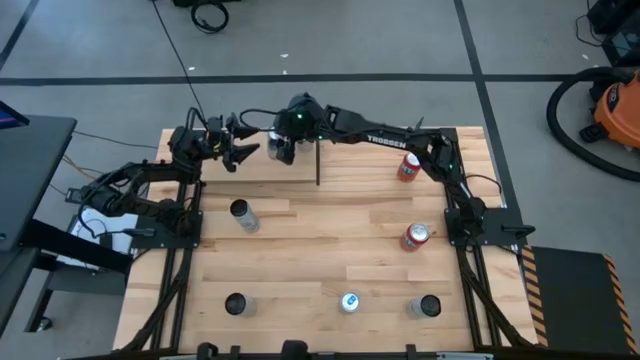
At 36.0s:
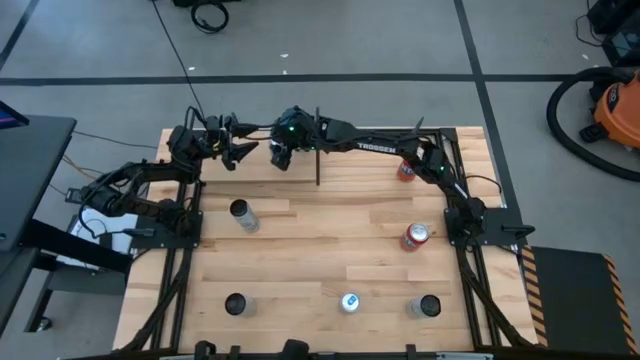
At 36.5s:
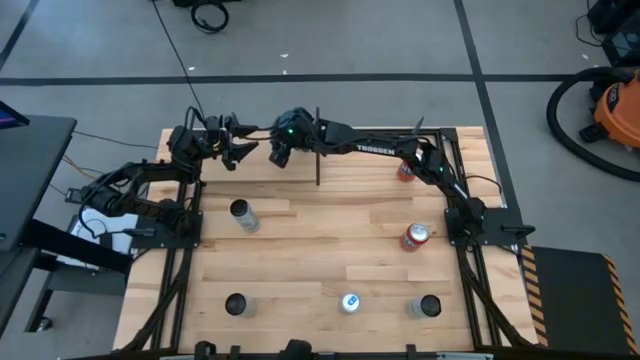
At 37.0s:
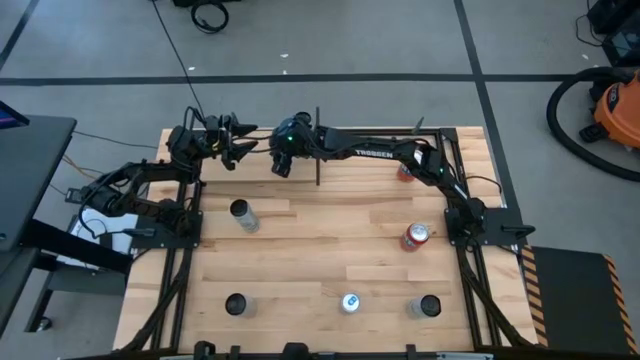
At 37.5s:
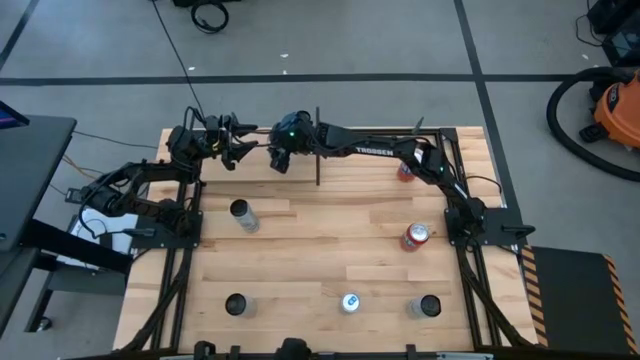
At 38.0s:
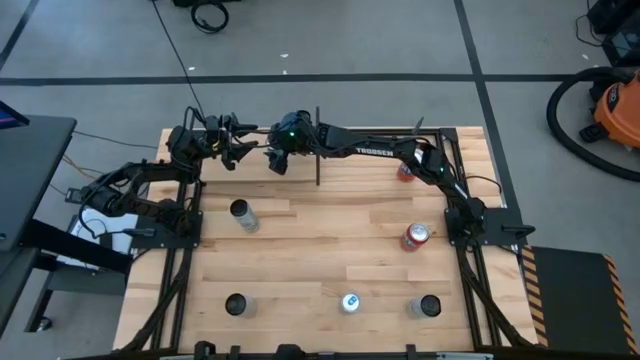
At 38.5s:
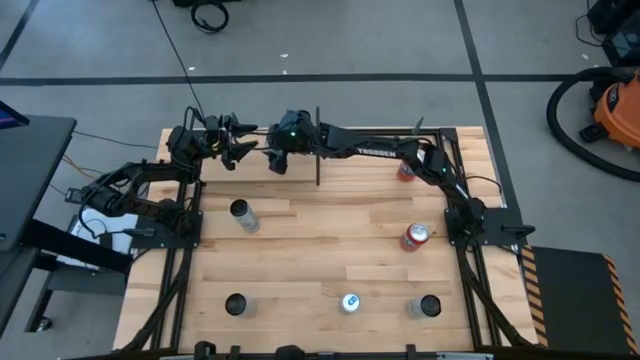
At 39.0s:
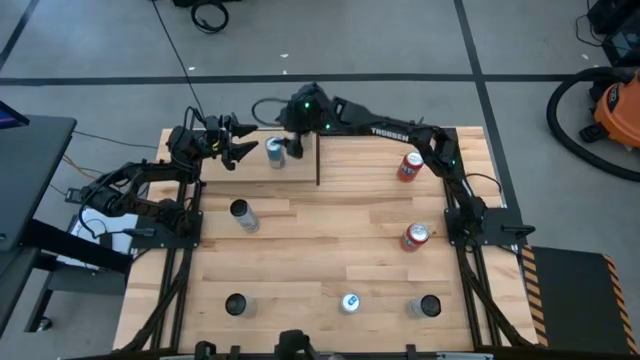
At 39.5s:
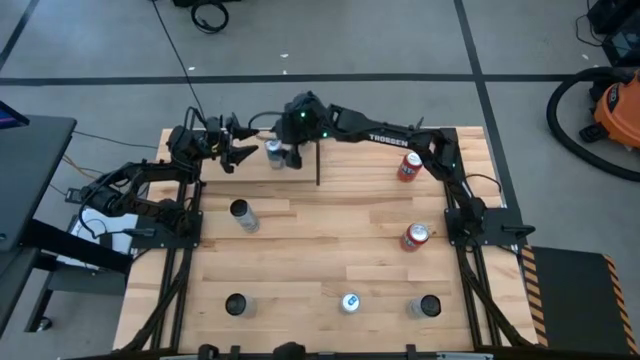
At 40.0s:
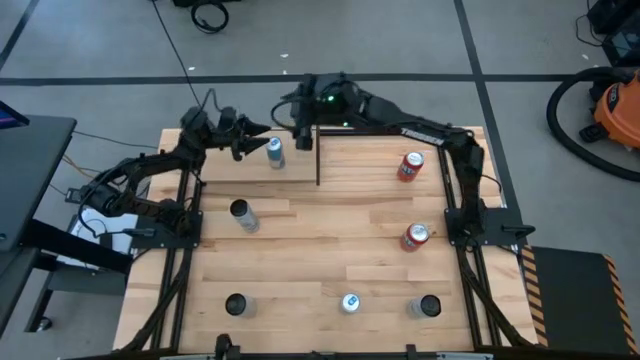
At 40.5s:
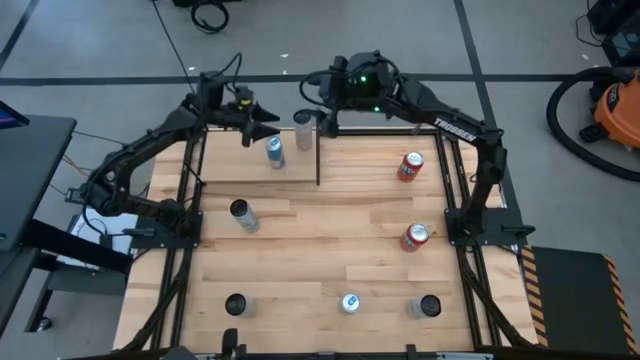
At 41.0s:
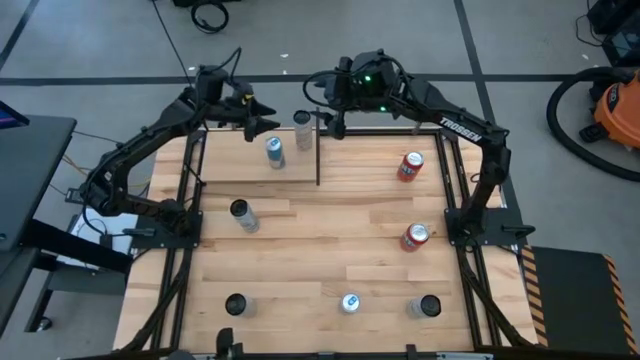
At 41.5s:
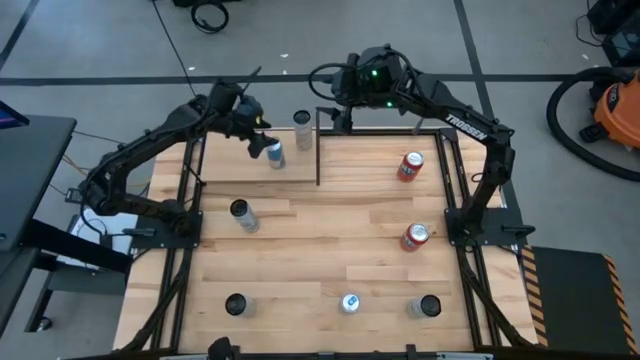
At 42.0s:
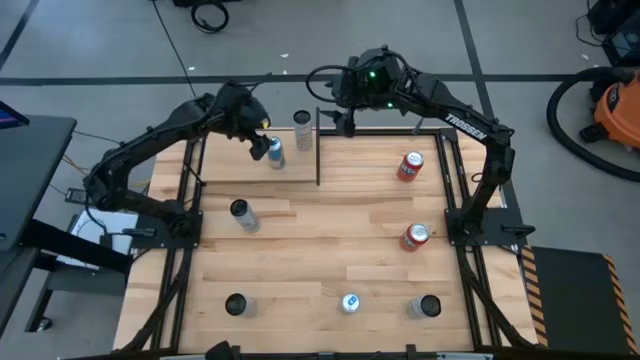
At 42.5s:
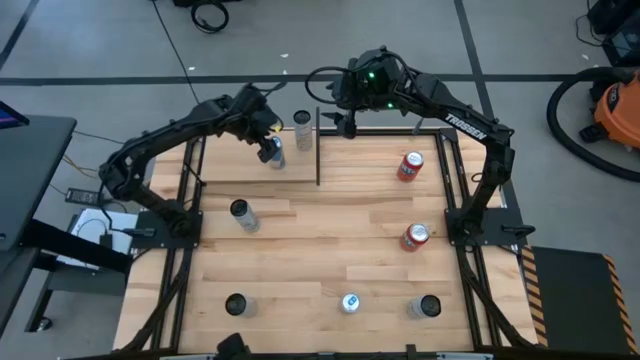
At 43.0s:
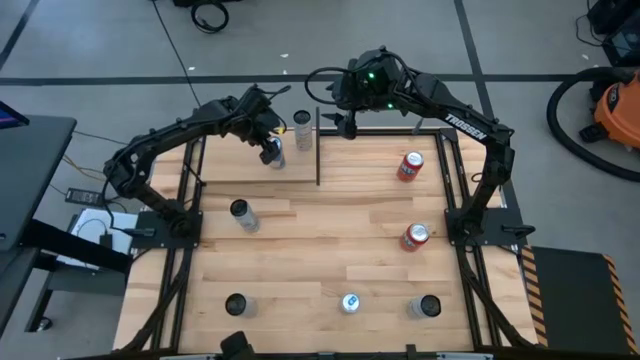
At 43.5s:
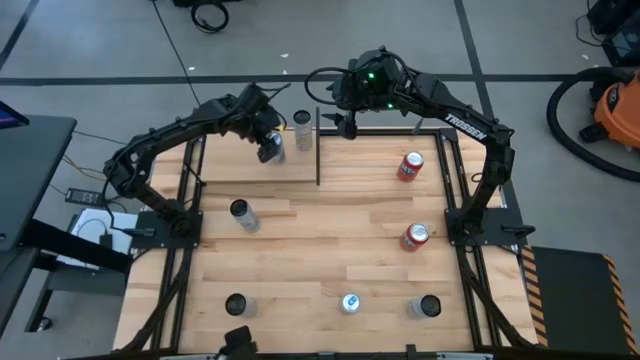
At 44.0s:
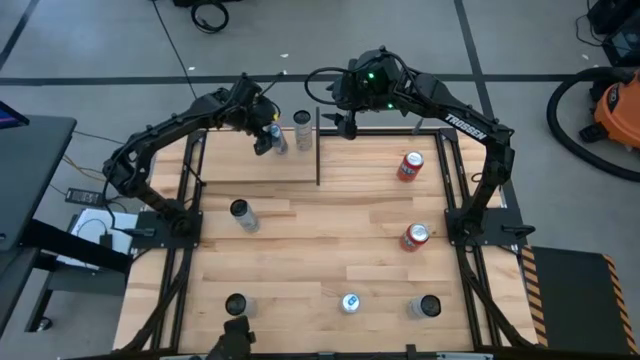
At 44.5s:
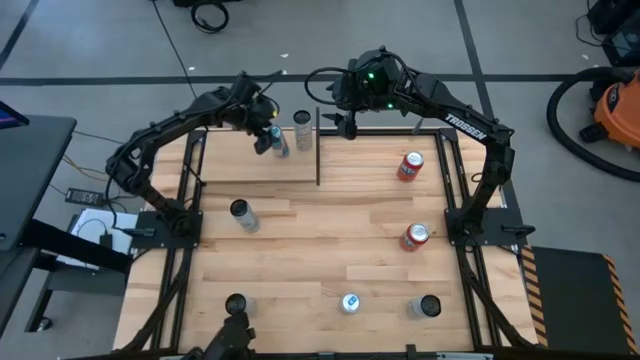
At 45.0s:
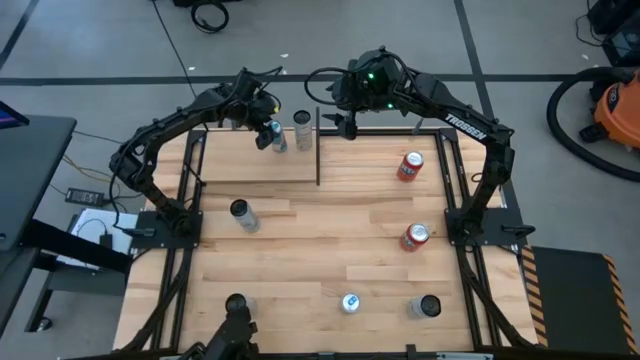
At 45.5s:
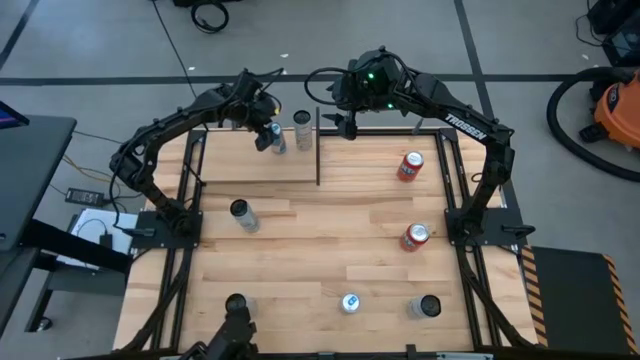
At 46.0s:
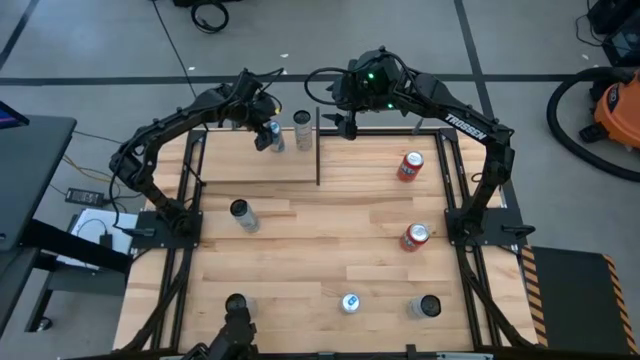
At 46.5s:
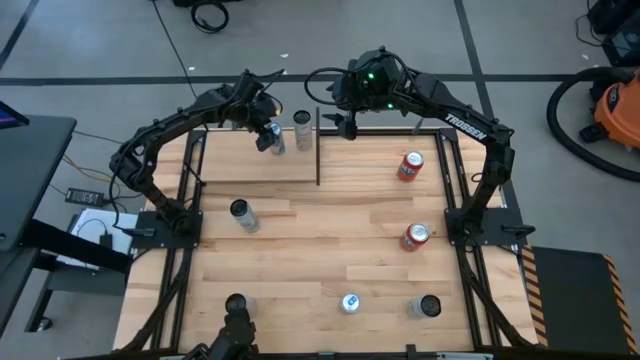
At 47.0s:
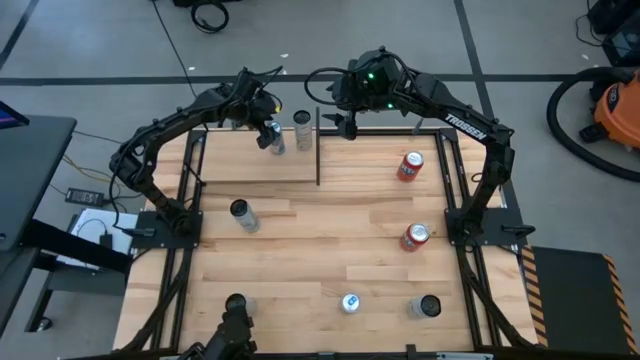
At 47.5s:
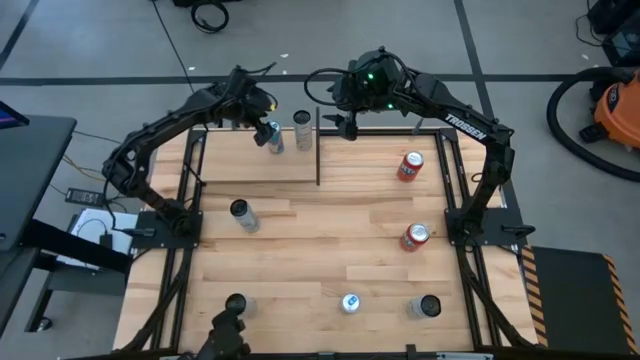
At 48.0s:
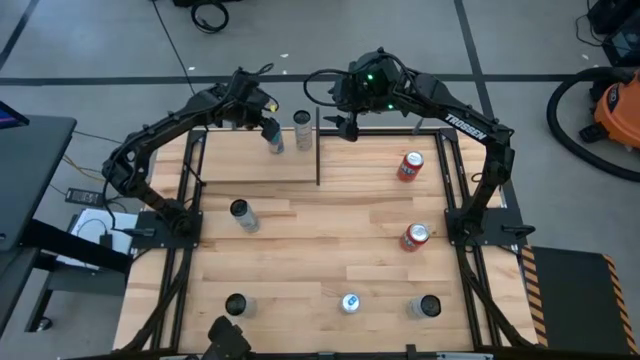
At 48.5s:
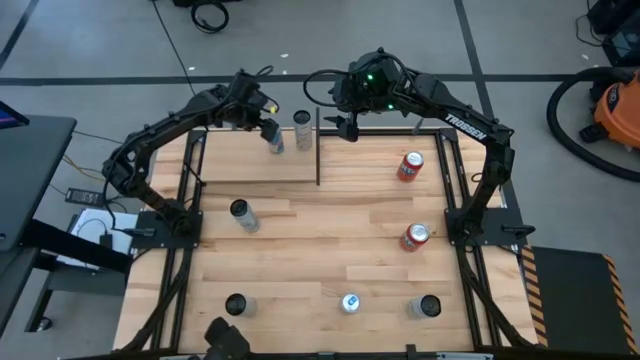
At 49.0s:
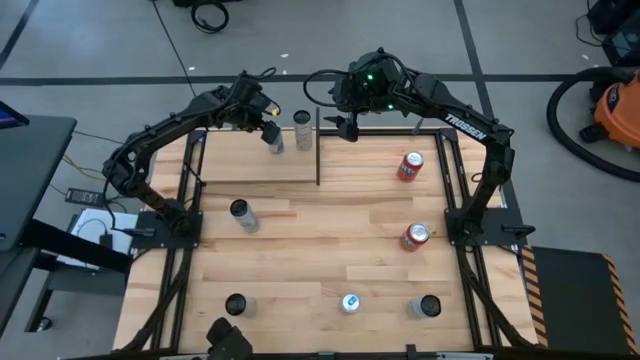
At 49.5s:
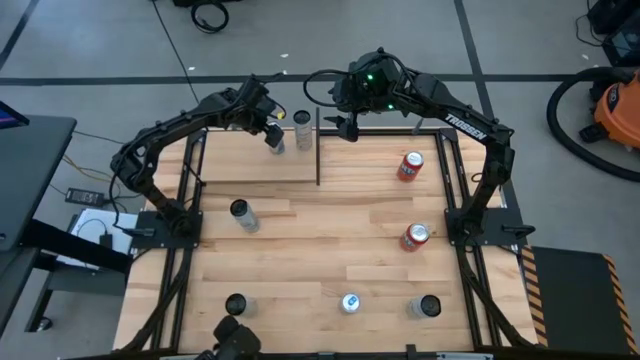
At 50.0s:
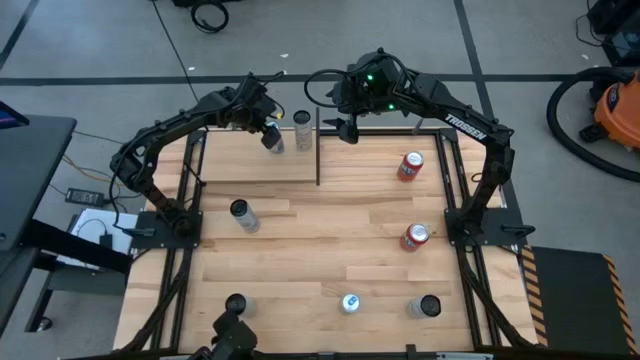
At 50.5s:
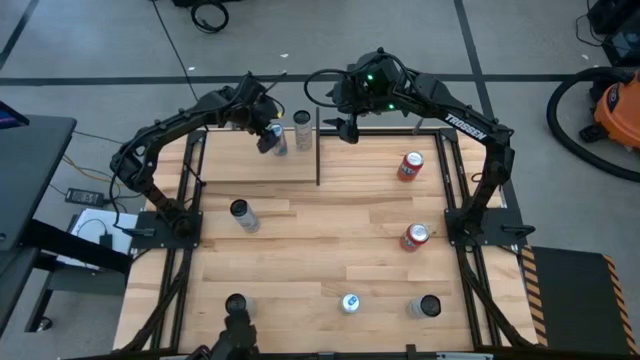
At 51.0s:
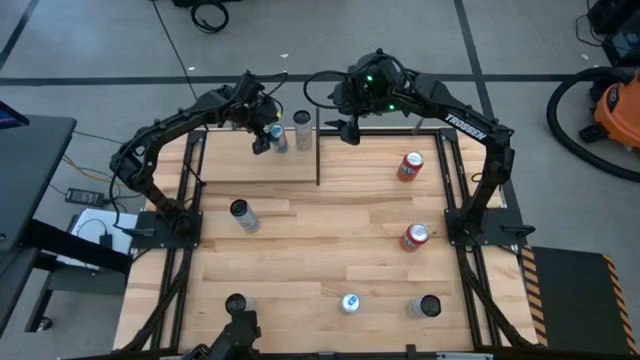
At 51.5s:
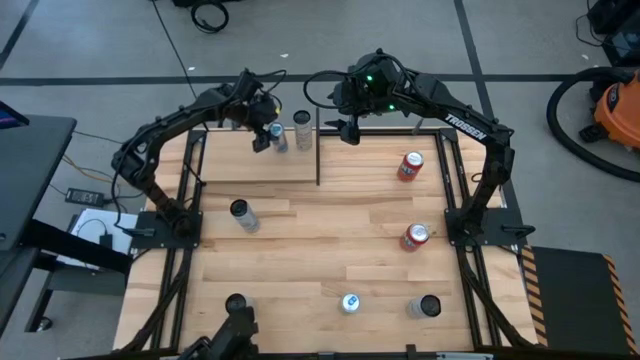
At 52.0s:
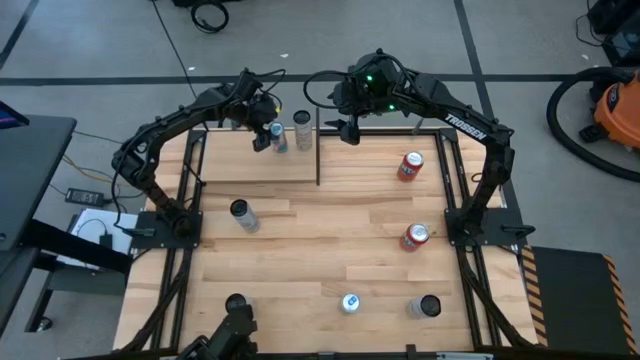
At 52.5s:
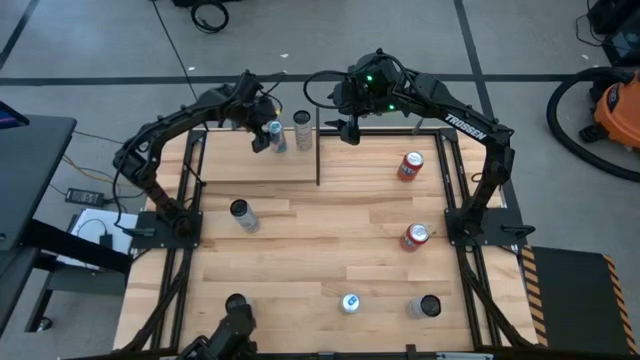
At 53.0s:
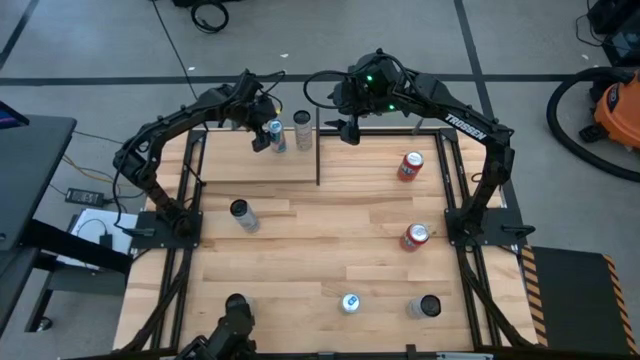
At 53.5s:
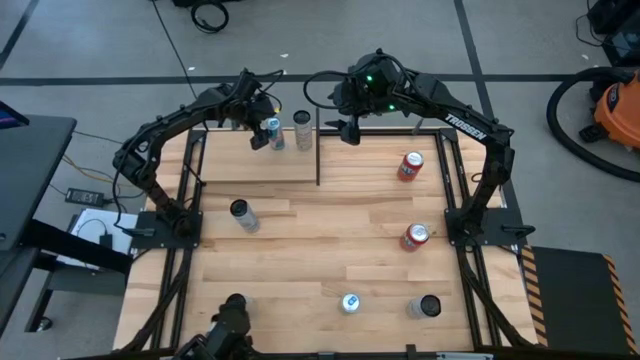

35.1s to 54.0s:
Task: Place canned beverage on shelf
Put the top blue soda can on the shelf

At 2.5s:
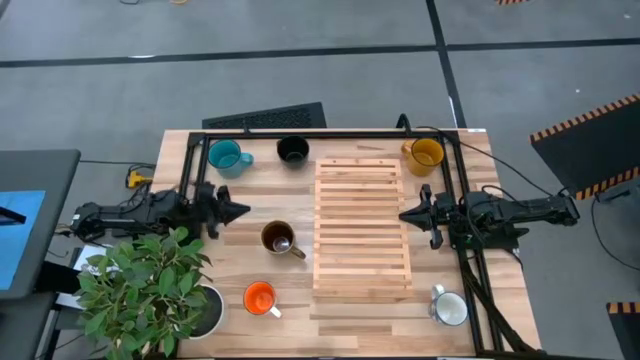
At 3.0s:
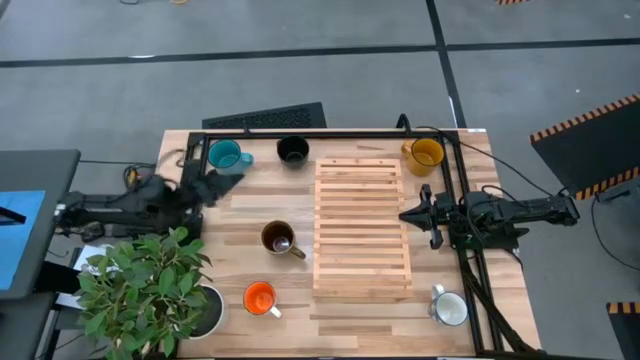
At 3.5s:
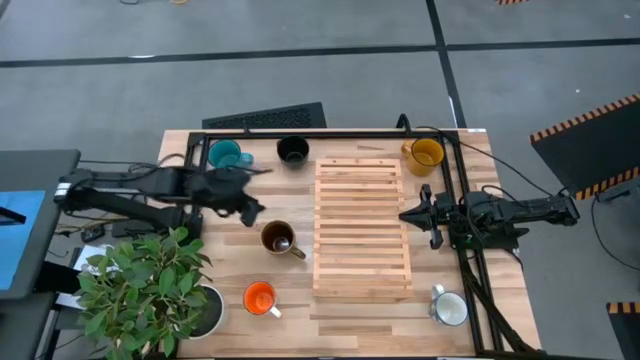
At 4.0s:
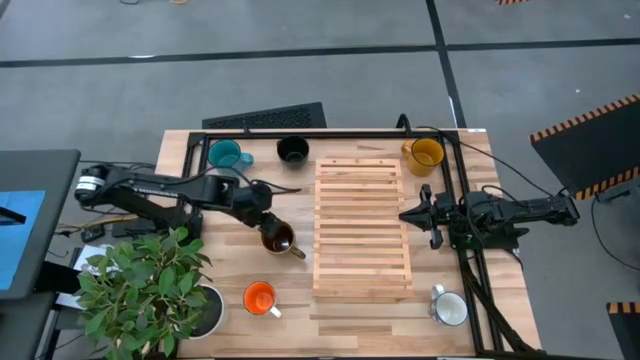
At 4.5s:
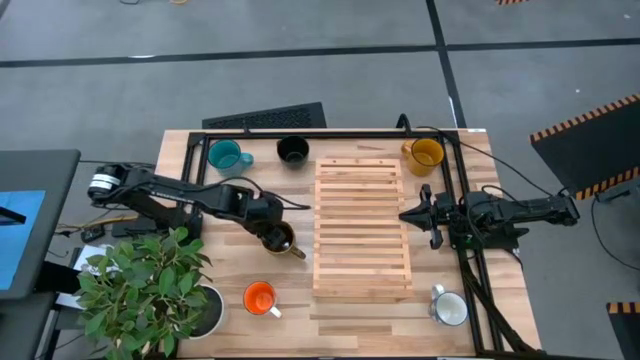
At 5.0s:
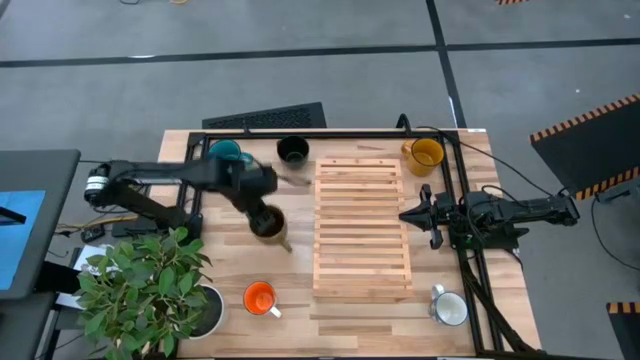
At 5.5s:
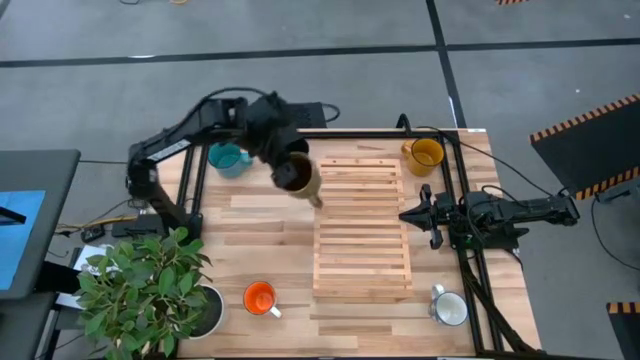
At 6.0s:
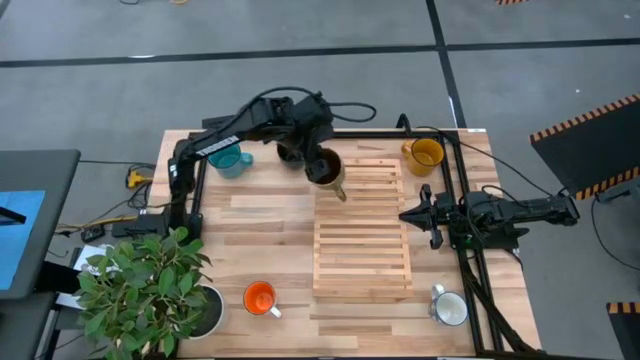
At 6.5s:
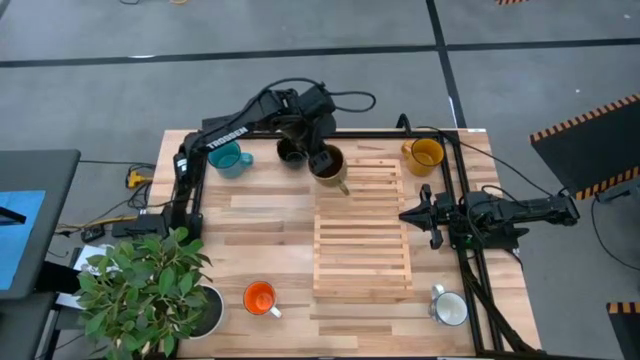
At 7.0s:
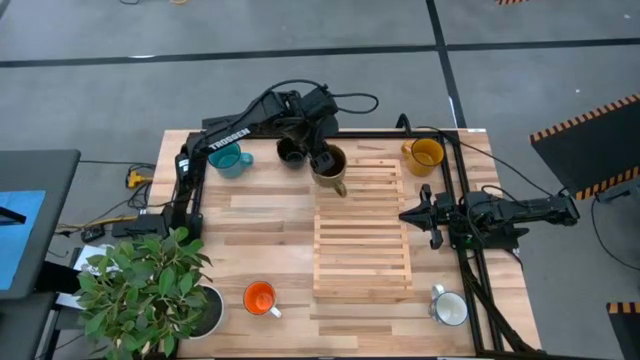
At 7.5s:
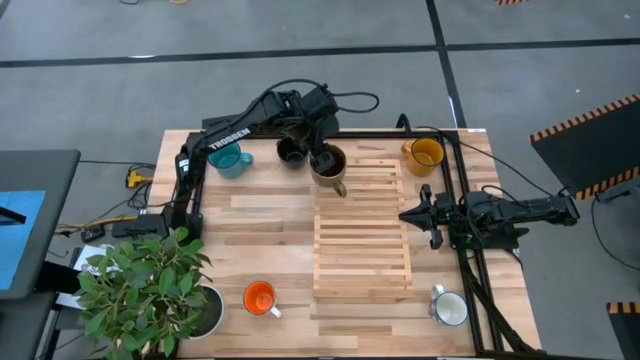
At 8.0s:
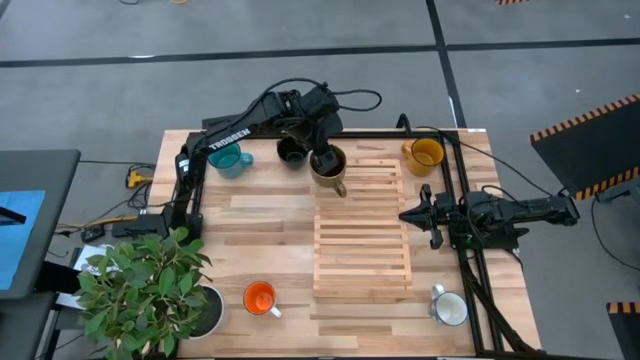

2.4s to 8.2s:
Task: Place coffee mugs
Put the brown mug on the shelf
